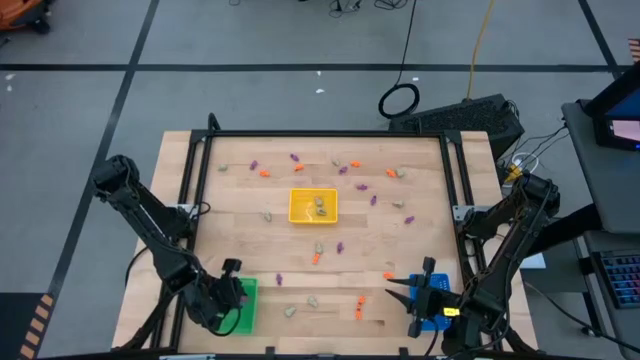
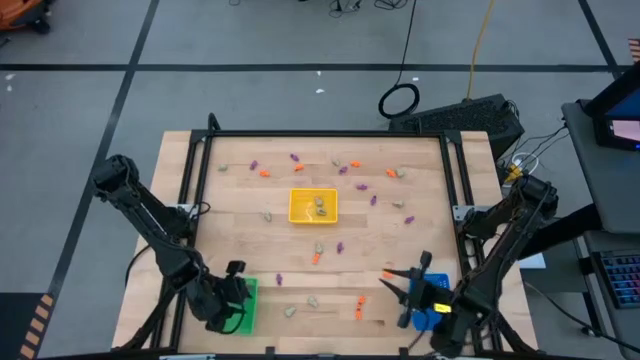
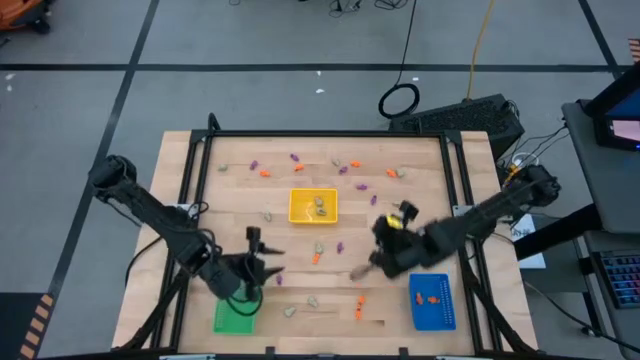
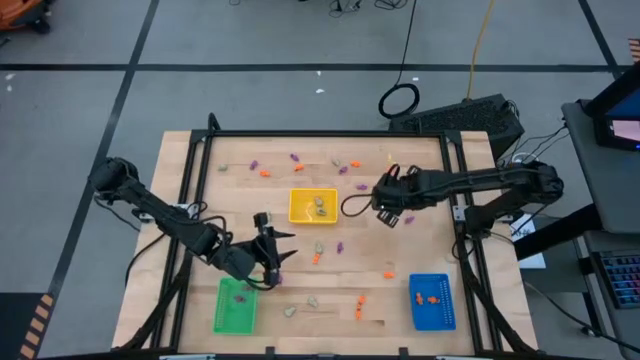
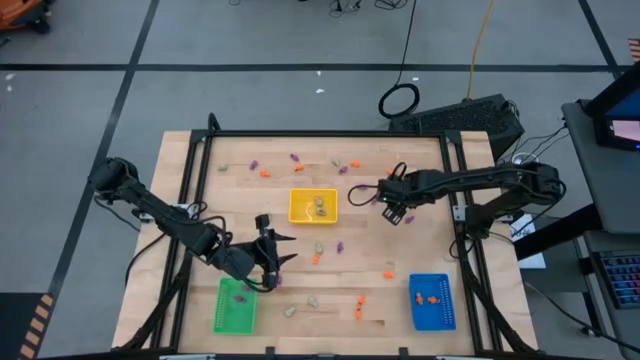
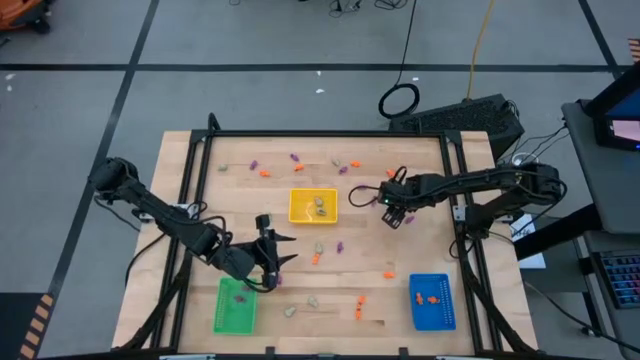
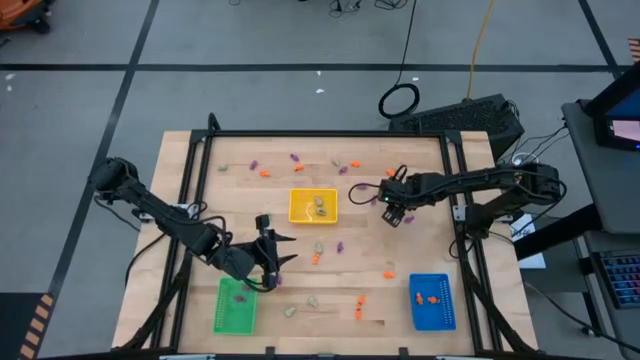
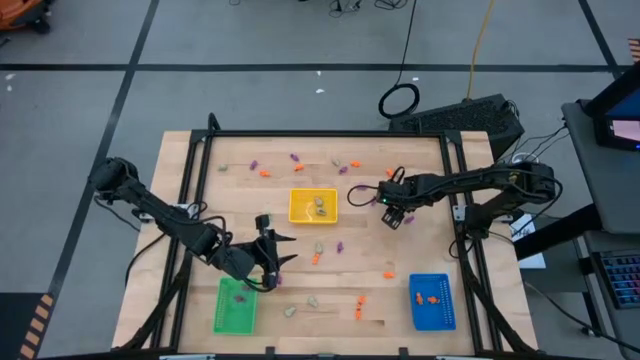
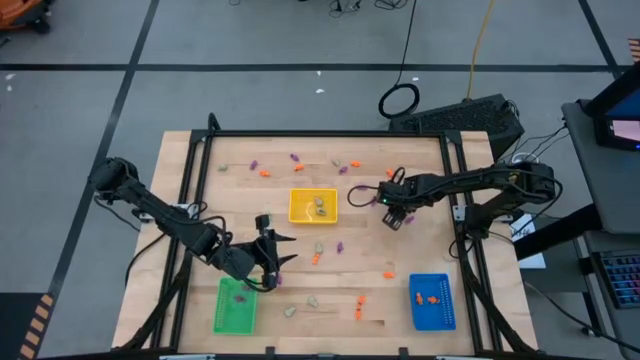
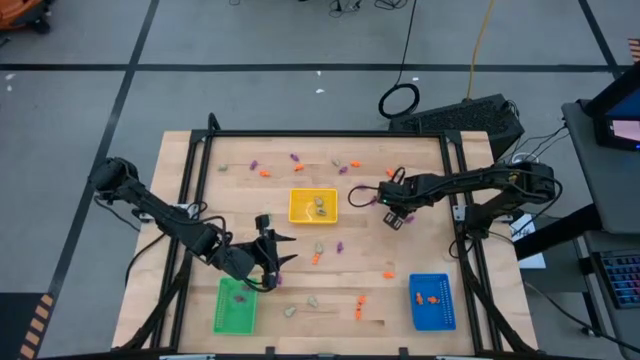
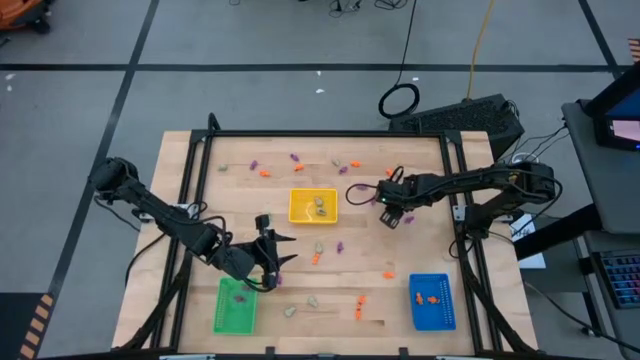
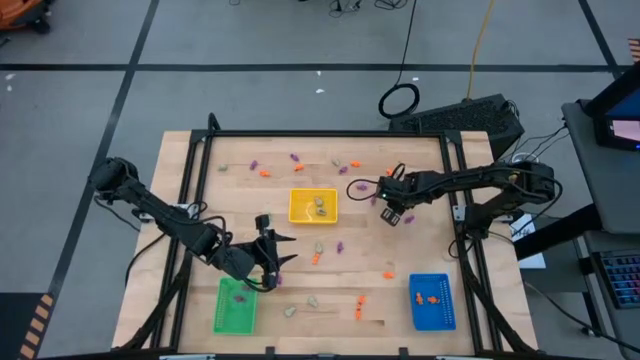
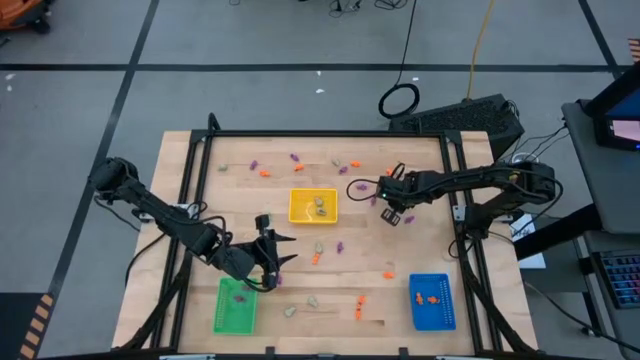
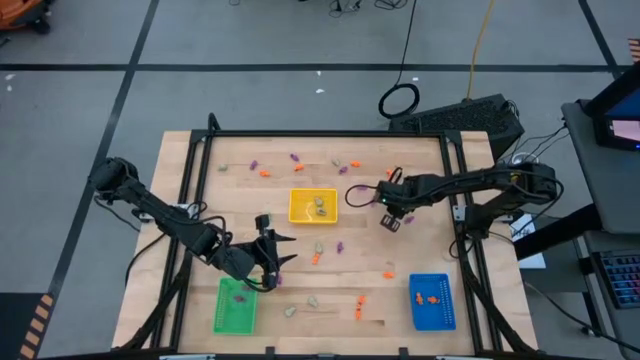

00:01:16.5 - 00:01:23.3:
Task: Sort Halloween decoration
Put the white skull toy in the yellow basket

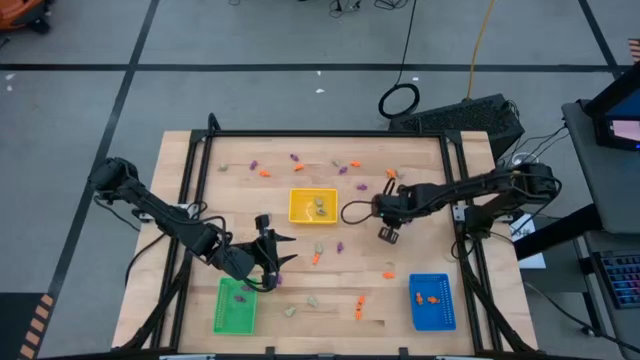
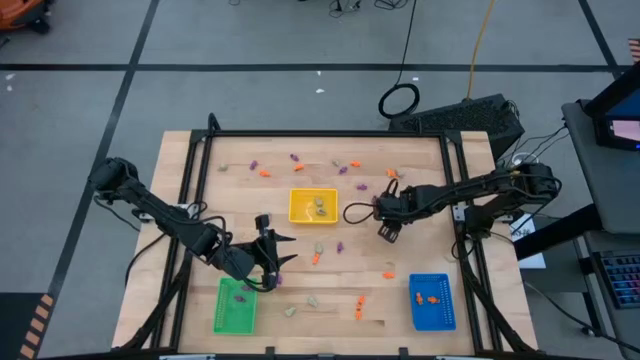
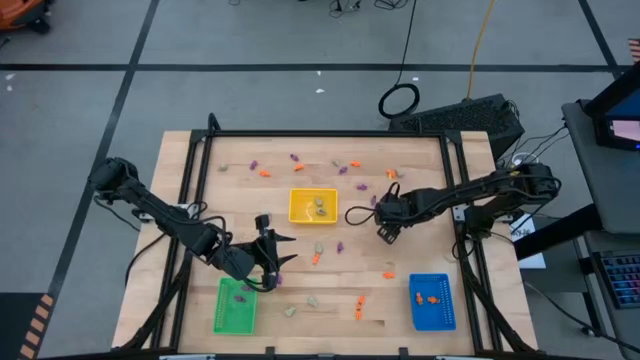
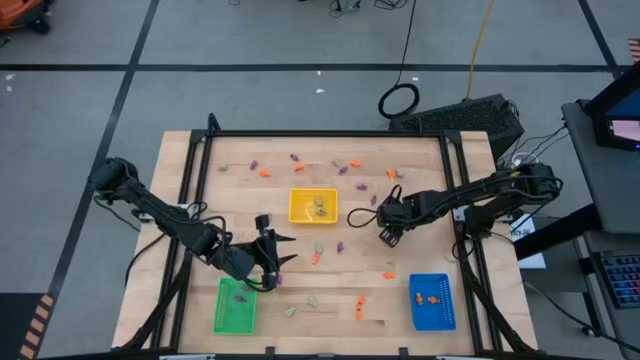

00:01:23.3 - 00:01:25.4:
Put the white skull toy in the yellow basket

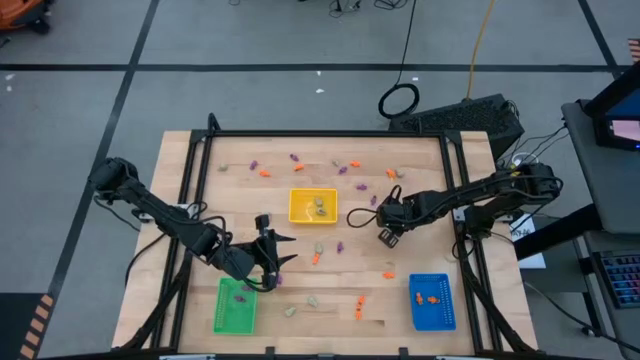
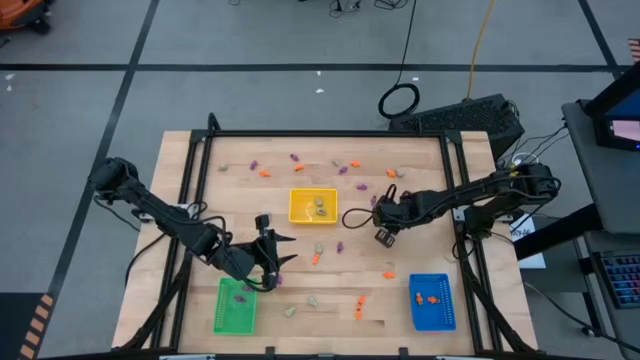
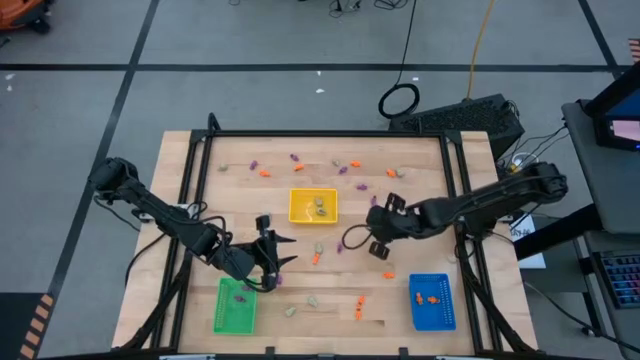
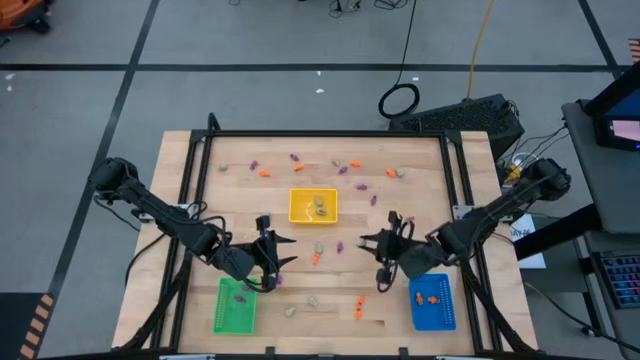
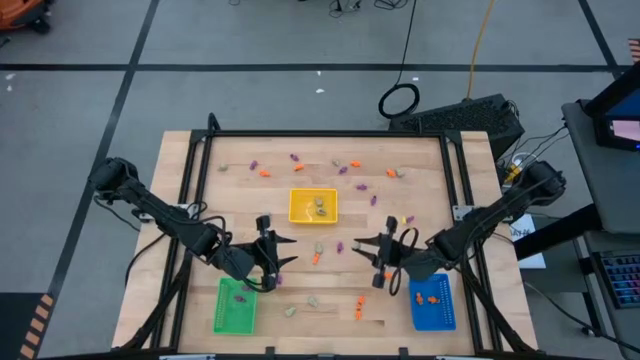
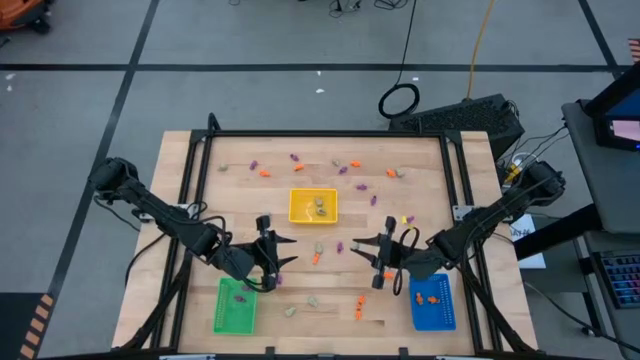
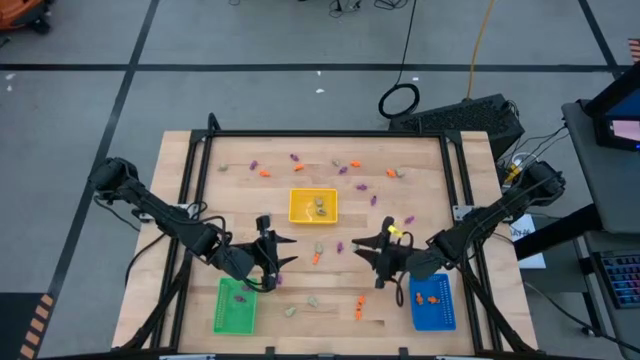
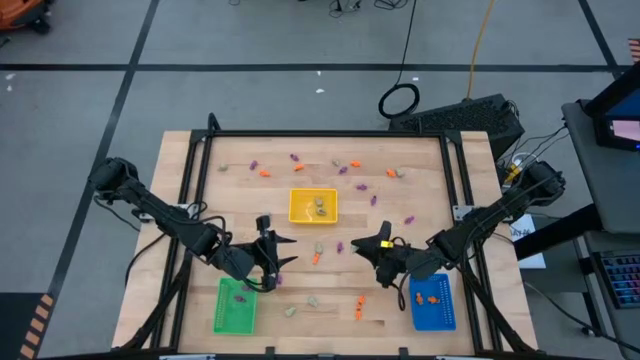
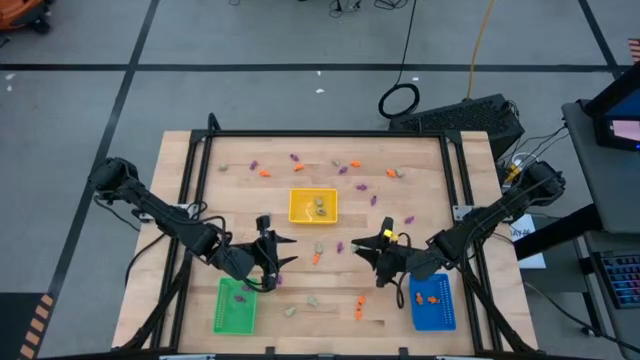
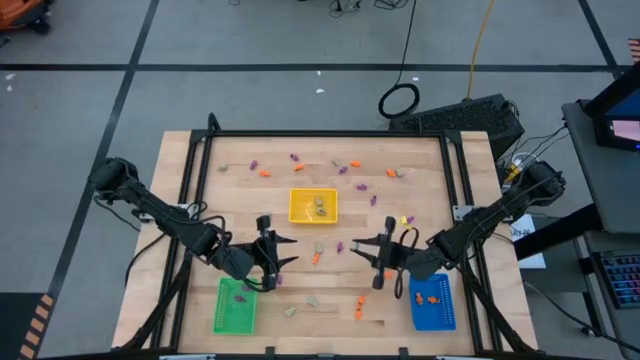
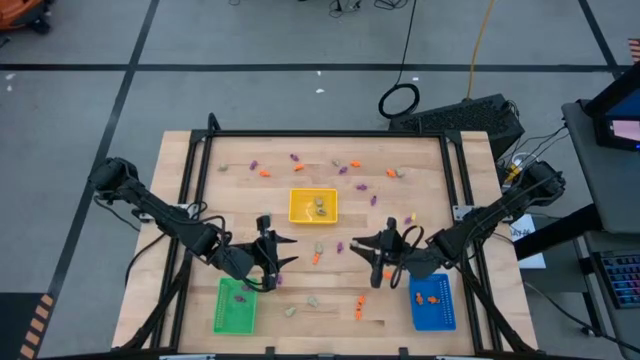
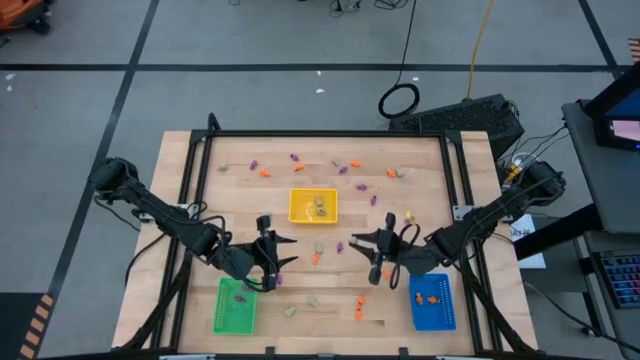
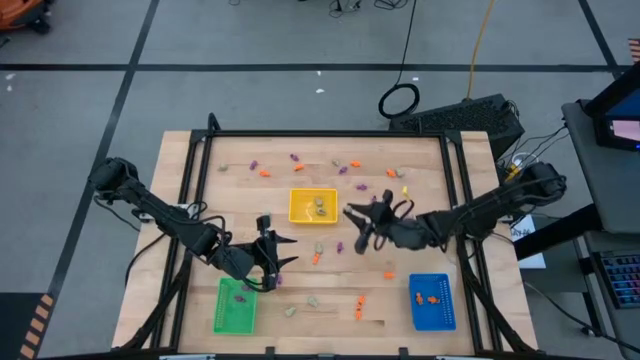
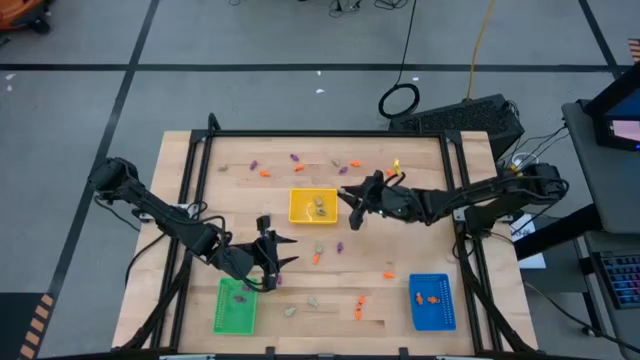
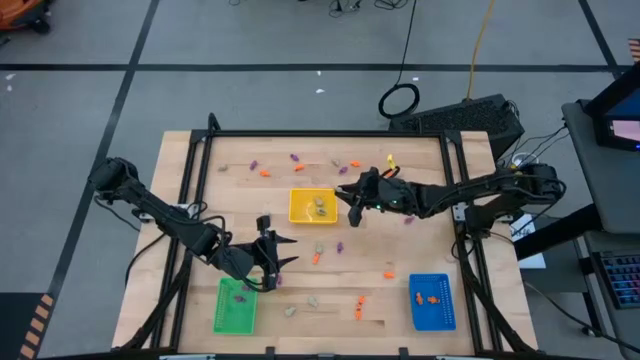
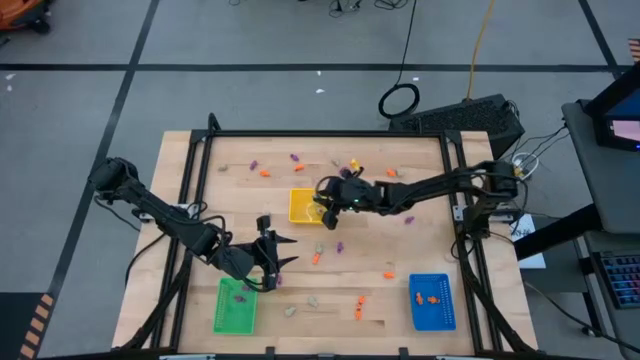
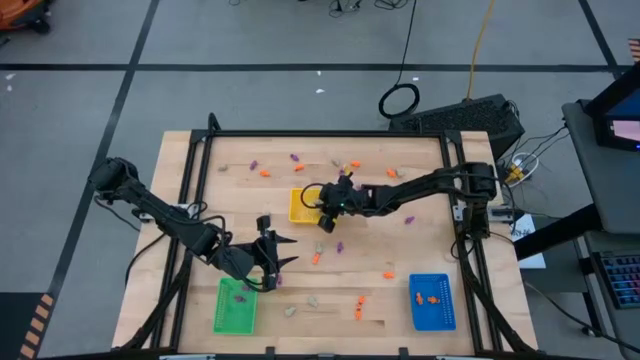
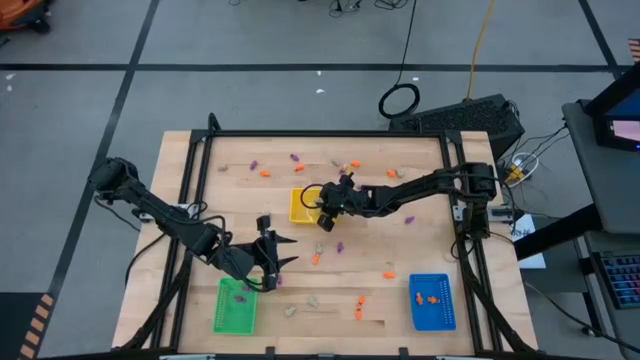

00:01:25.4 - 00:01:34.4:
Put the white skull toy in the yellow basket

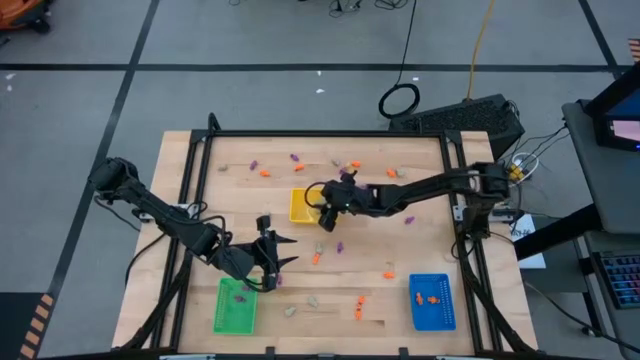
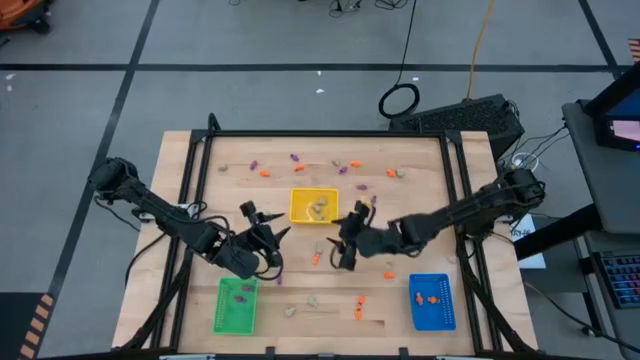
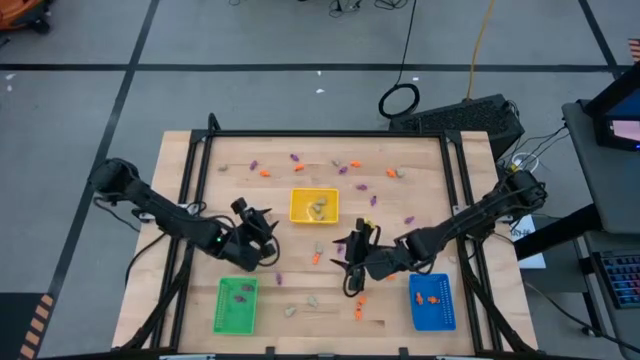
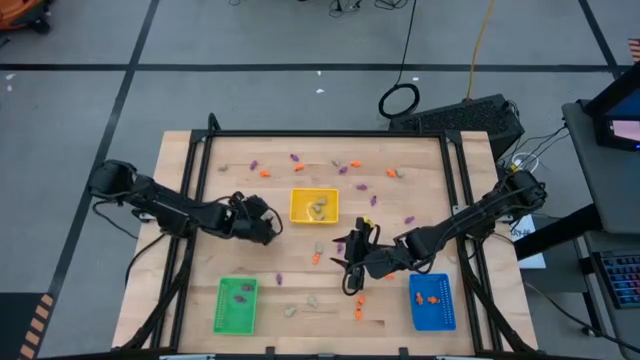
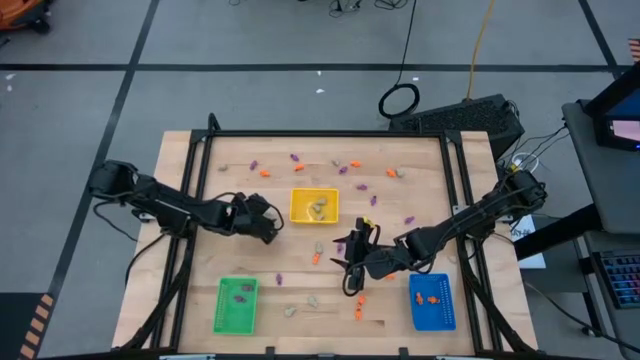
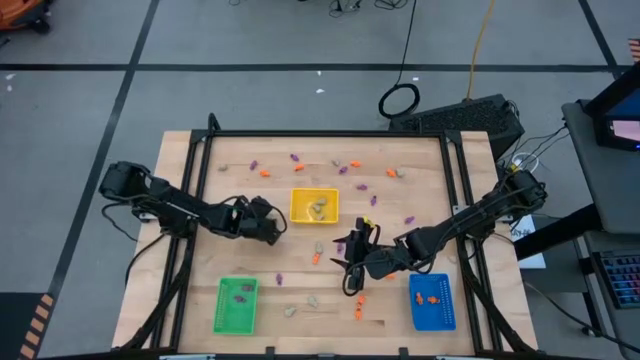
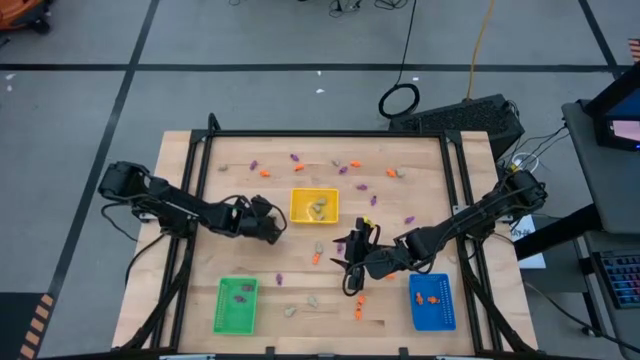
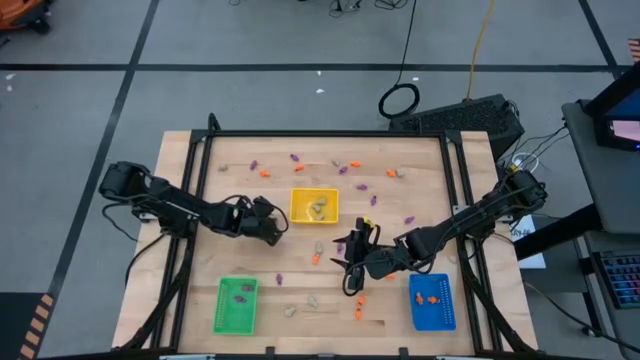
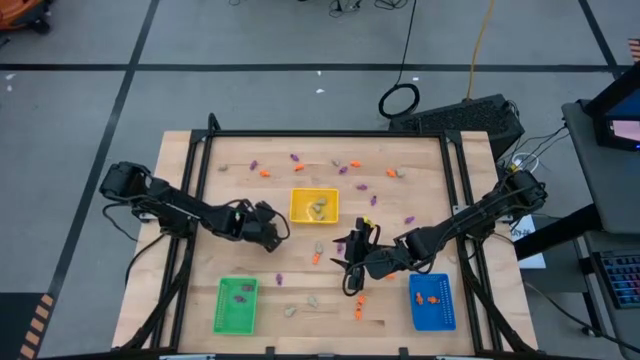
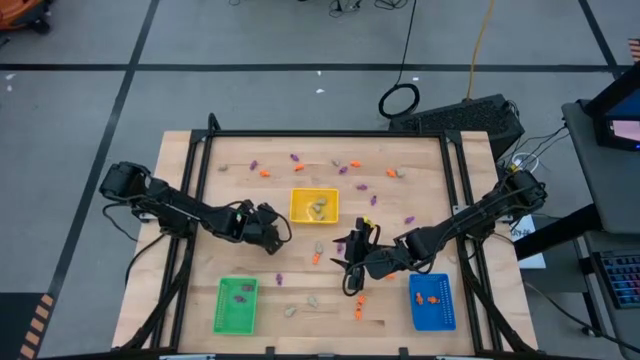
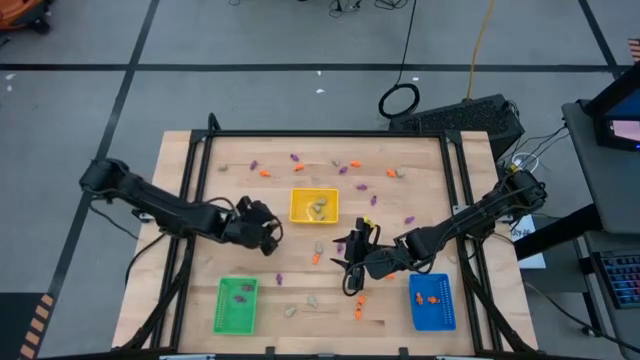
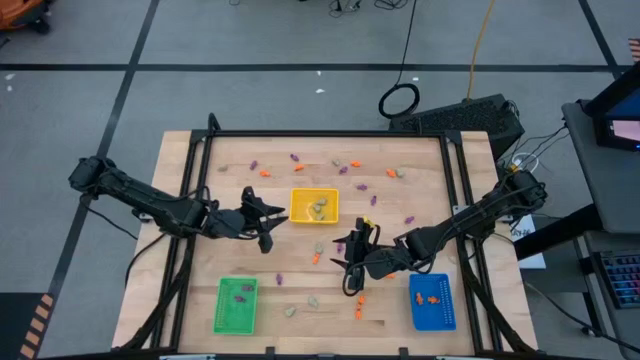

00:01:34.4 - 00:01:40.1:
Put the white skull toy in the yellow basket
